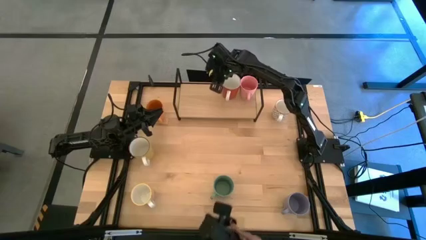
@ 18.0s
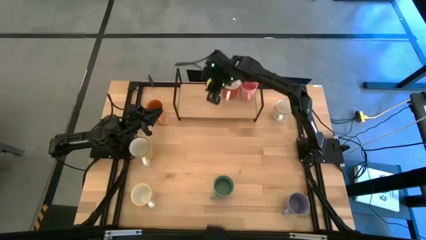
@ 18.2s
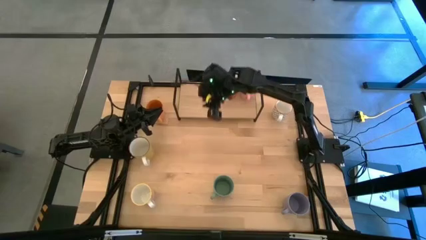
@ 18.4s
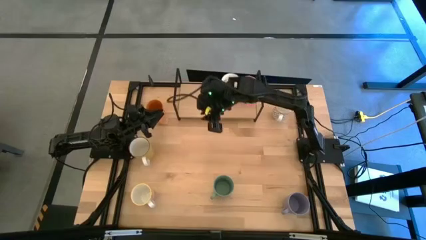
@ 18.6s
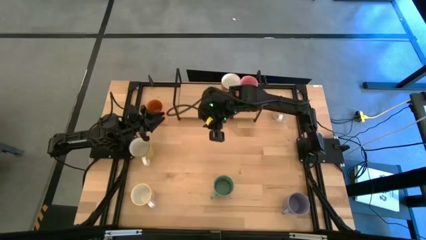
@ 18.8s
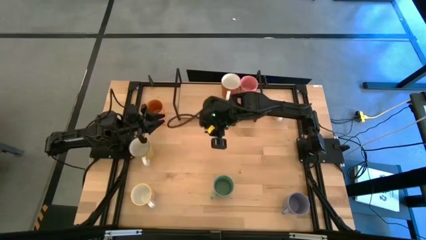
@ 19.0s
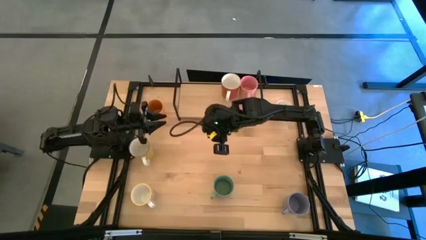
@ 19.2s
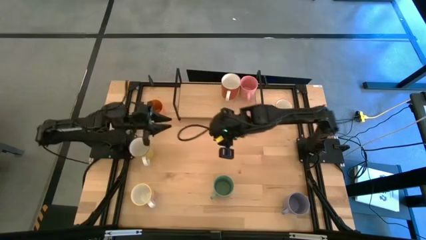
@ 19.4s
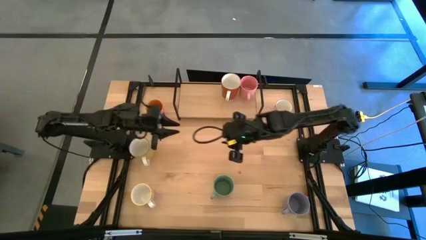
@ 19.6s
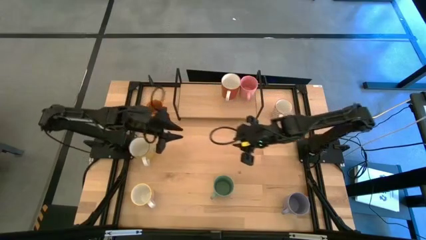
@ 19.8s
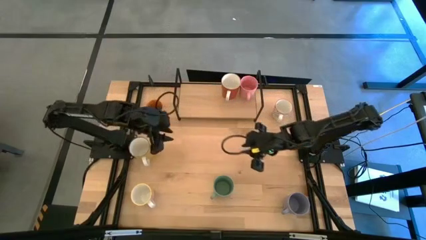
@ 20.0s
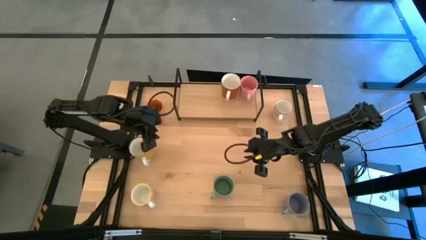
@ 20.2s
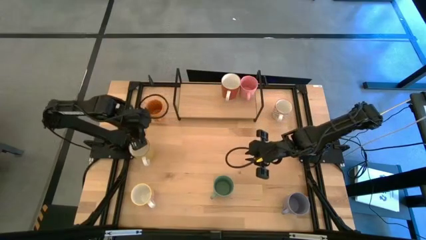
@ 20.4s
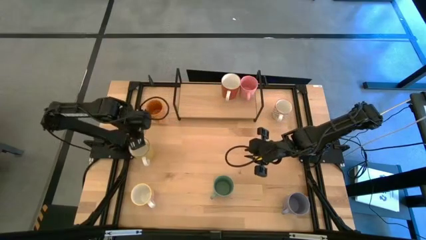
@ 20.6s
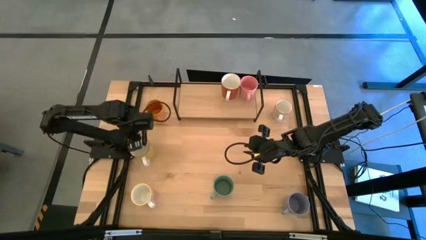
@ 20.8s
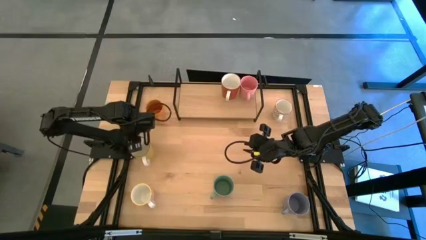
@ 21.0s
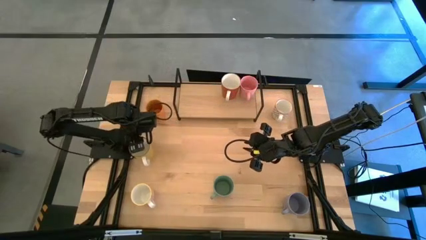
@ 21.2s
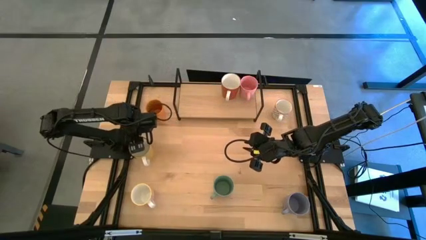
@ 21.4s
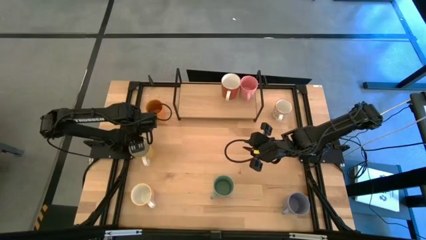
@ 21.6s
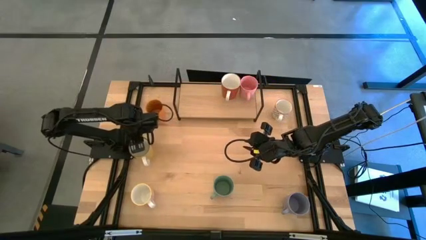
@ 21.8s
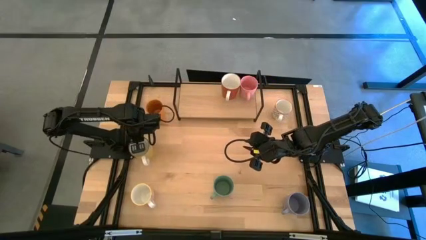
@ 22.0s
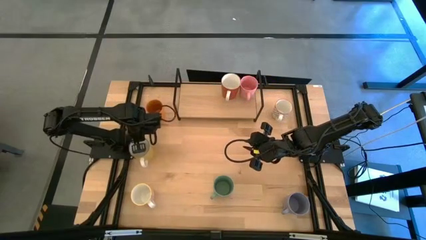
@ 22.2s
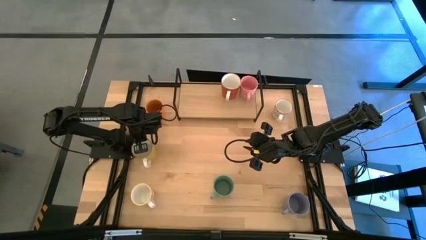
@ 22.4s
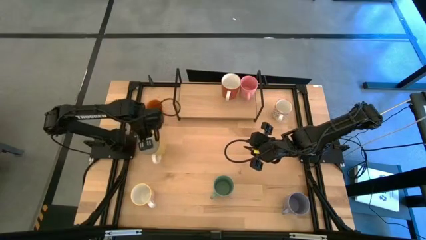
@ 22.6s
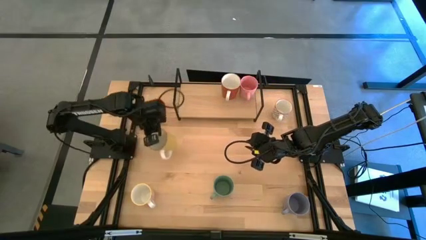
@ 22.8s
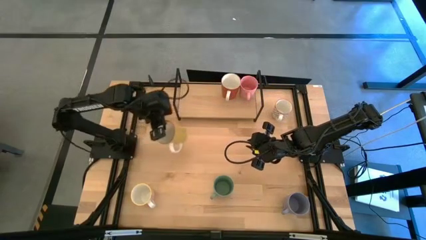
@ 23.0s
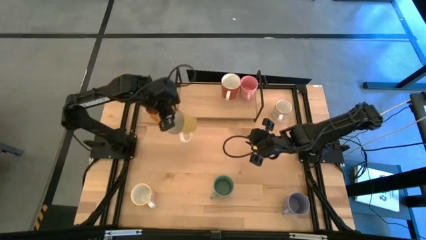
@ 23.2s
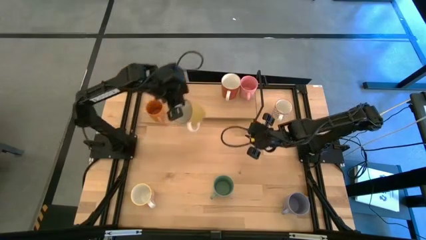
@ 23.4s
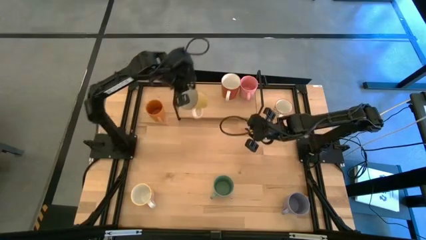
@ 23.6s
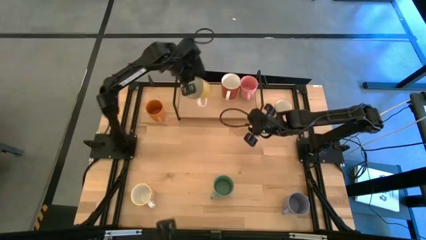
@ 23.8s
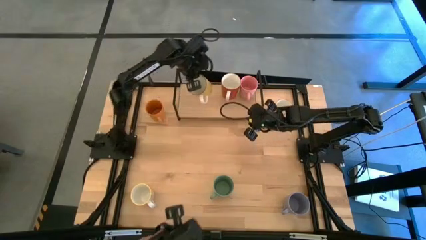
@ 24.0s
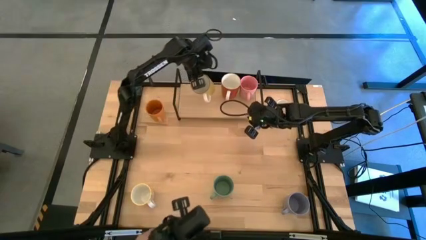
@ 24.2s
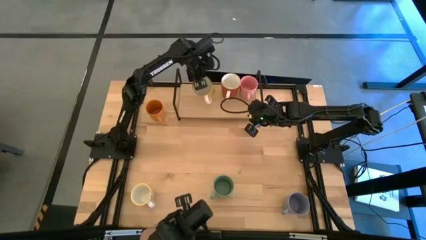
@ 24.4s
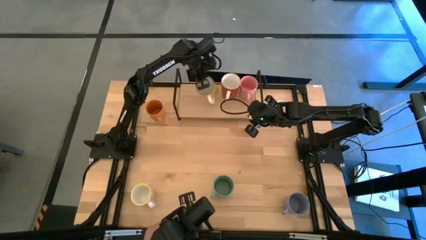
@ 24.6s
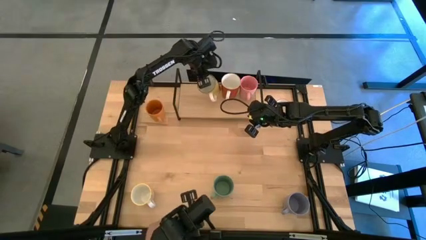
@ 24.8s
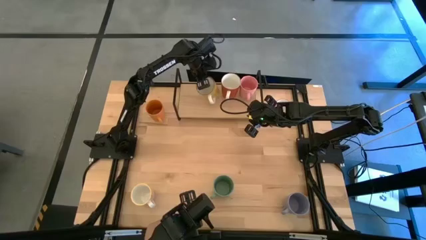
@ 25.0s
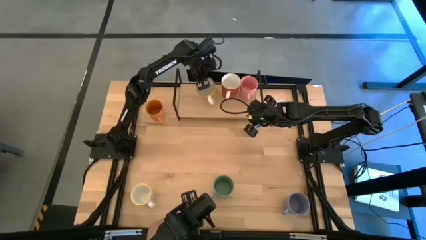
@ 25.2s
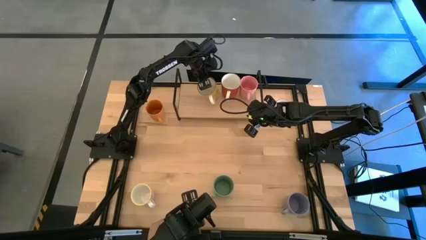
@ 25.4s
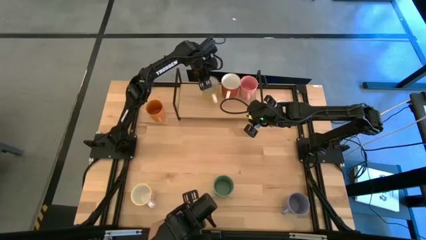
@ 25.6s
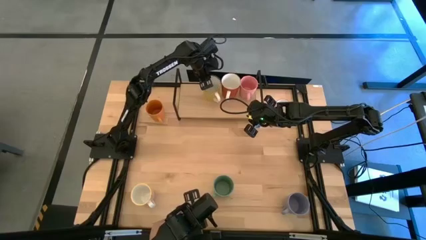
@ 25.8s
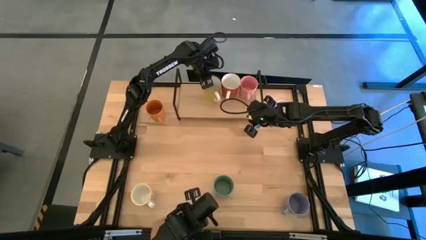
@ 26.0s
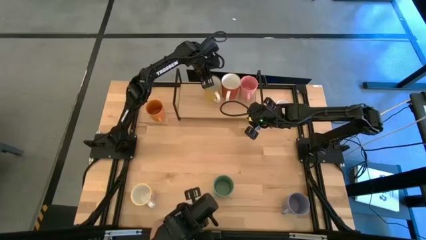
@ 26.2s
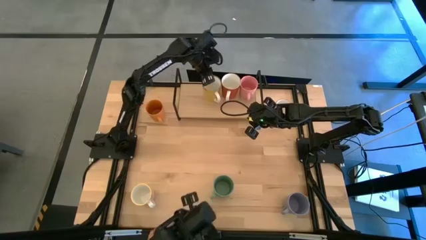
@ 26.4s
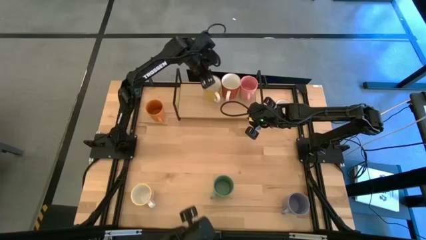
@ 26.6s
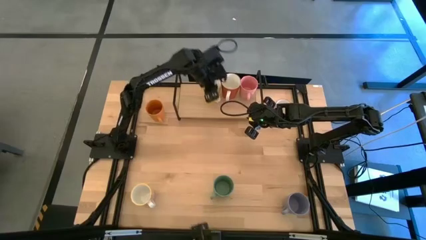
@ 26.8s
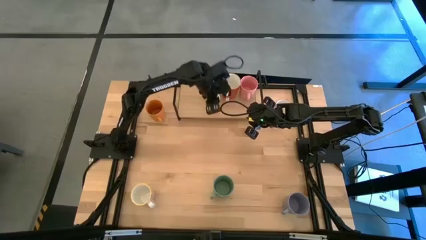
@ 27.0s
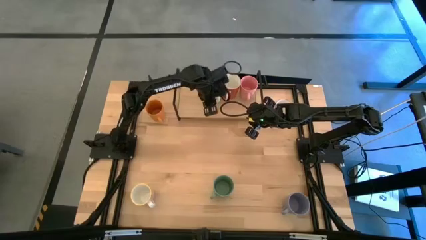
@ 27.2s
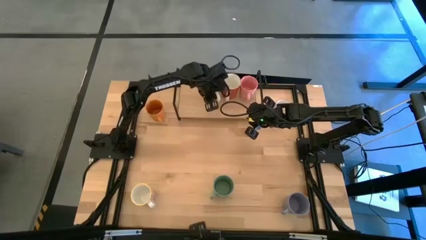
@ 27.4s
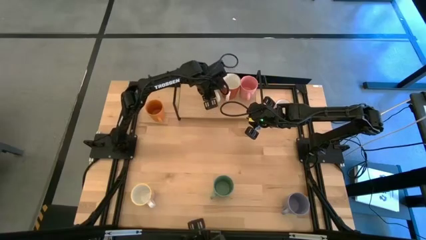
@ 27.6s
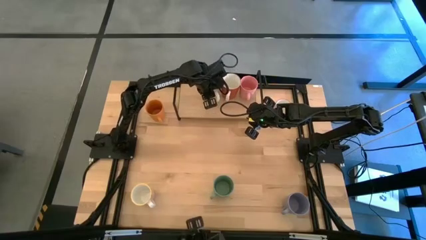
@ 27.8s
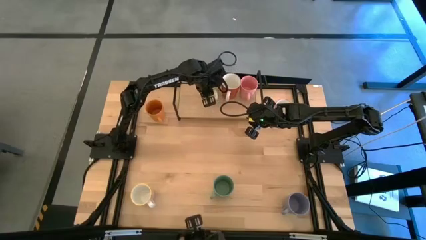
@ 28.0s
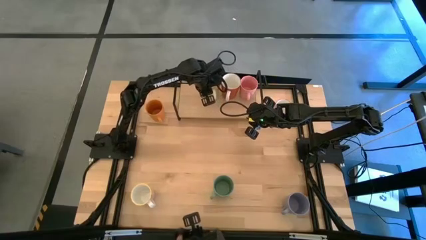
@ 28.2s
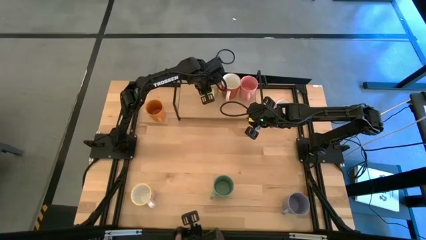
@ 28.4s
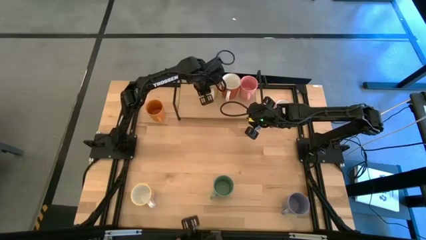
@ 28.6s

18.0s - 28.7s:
Task: Place coffee mugs
Put the yellow mug on the shelf

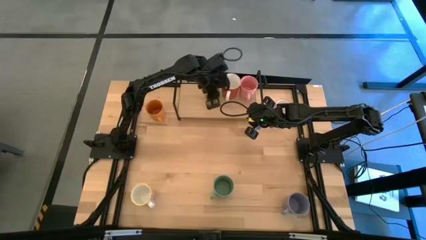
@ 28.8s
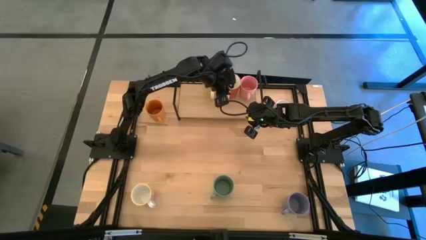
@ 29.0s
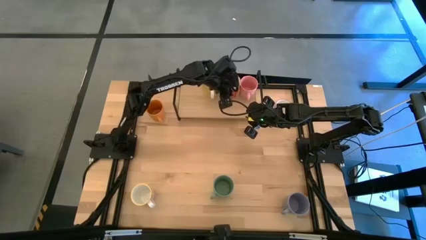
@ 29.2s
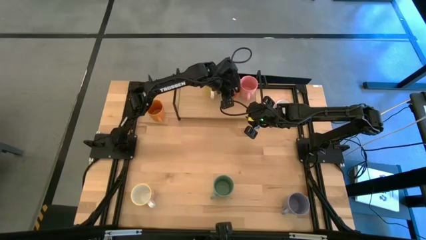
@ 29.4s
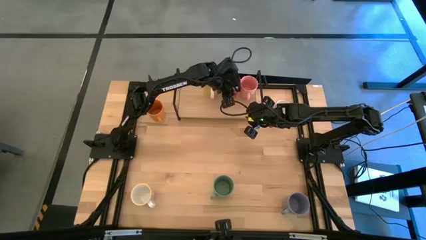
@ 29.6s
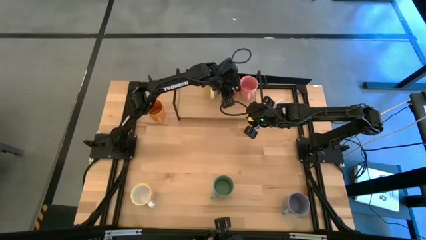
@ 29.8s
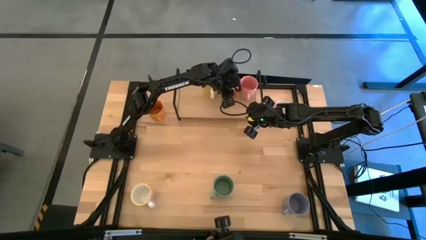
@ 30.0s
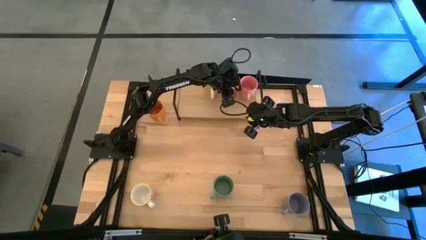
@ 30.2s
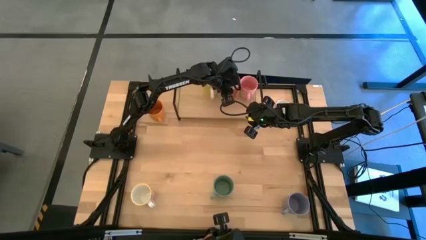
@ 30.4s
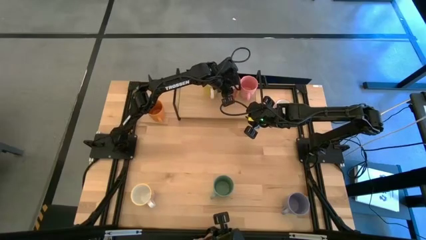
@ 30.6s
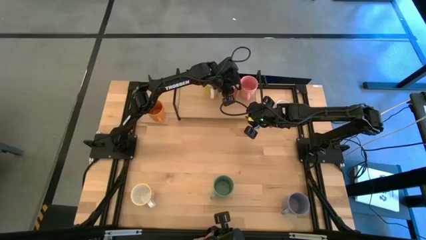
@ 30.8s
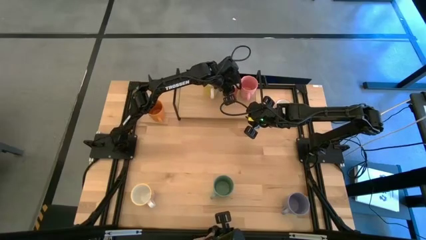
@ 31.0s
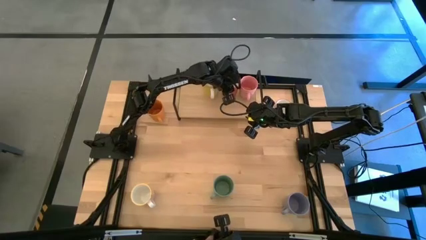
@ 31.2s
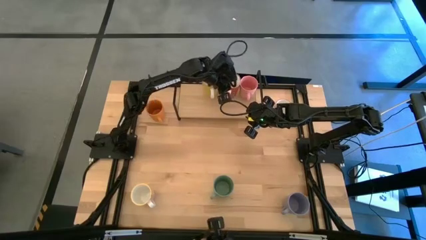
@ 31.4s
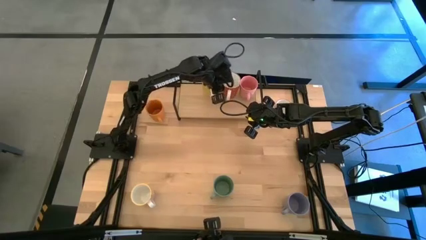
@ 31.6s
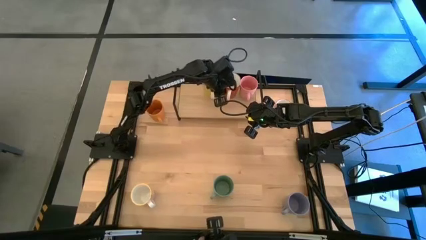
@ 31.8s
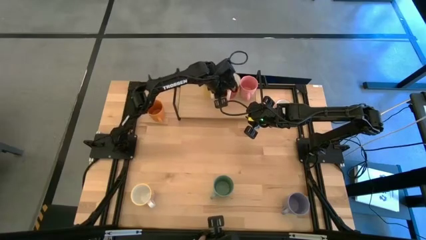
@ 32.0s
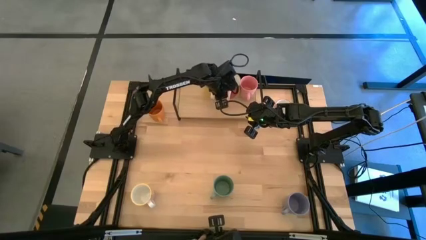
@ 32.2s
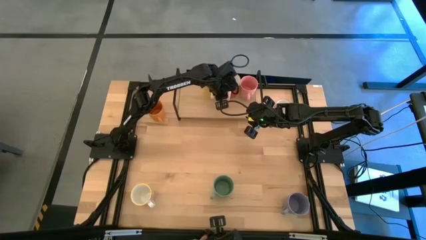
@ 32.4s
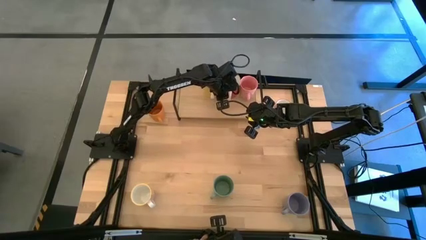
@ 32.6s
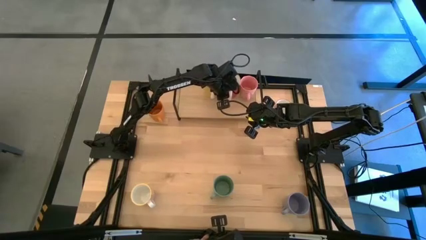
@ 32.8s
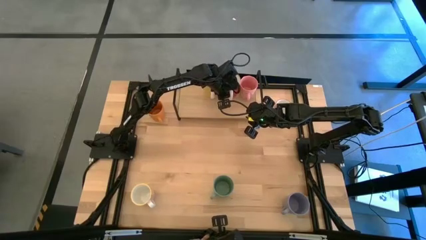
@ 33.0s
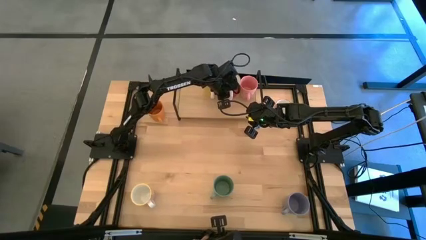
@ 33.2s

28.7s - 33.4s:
Adjust the red mug on the shelf
